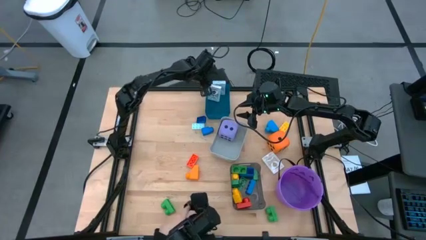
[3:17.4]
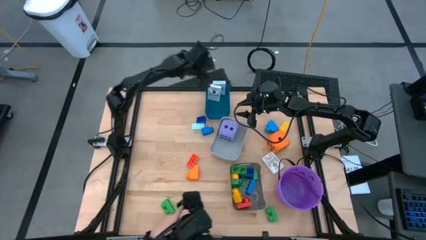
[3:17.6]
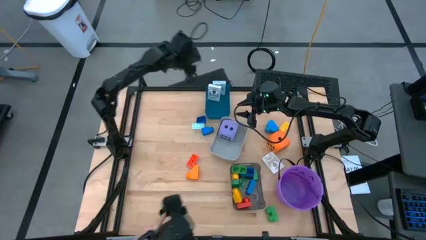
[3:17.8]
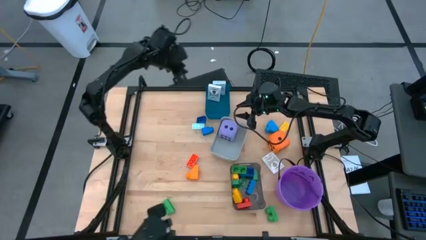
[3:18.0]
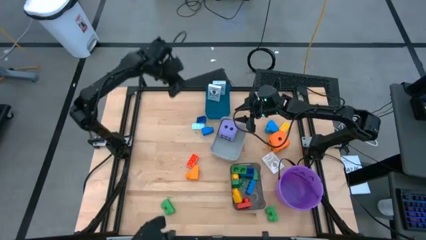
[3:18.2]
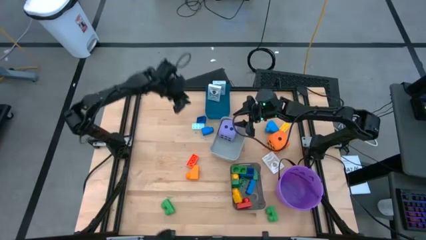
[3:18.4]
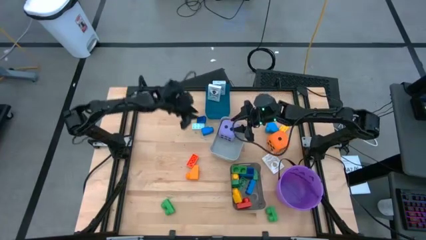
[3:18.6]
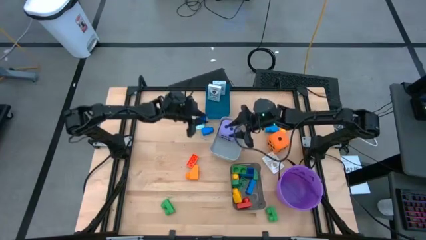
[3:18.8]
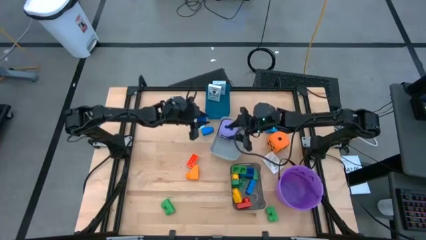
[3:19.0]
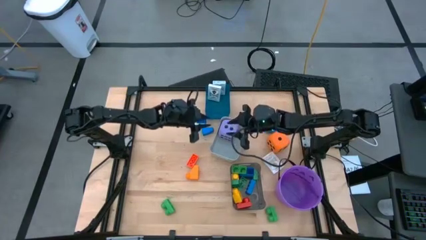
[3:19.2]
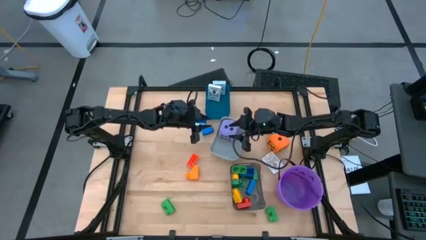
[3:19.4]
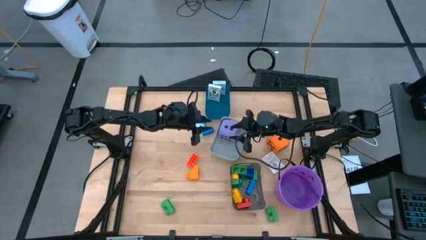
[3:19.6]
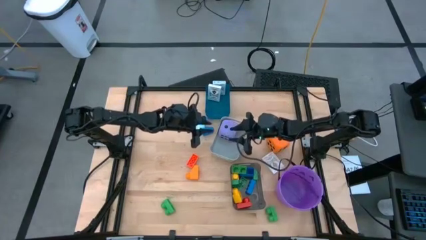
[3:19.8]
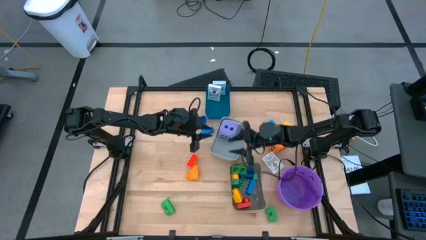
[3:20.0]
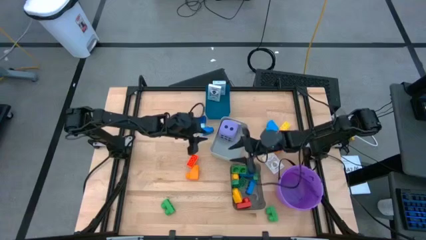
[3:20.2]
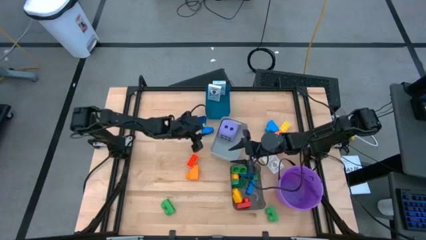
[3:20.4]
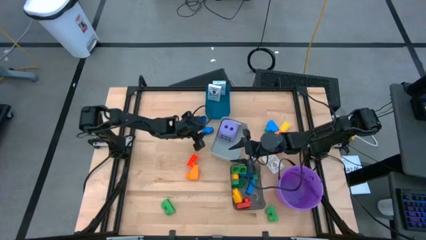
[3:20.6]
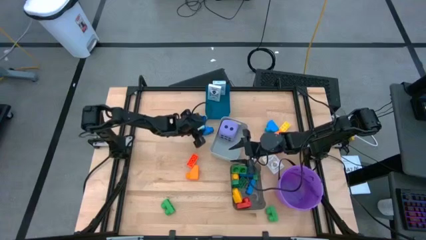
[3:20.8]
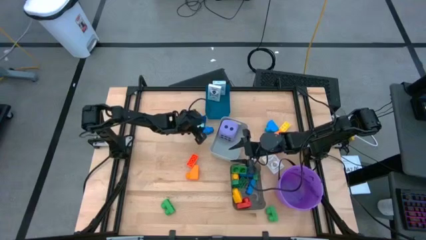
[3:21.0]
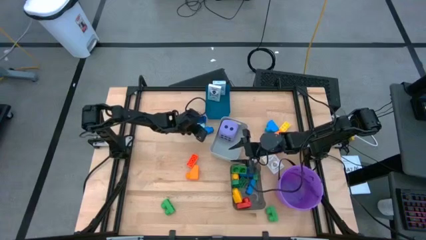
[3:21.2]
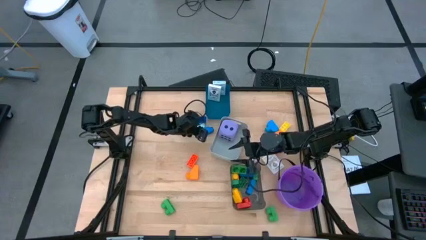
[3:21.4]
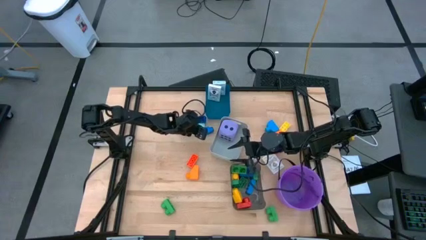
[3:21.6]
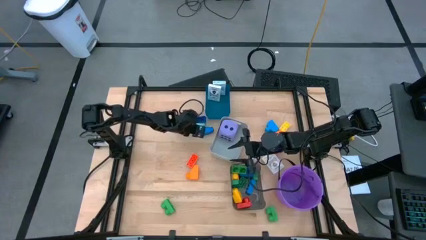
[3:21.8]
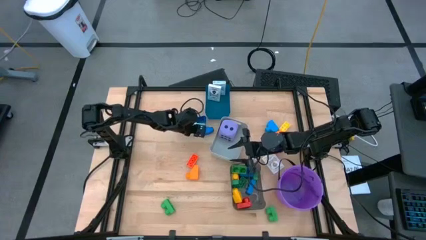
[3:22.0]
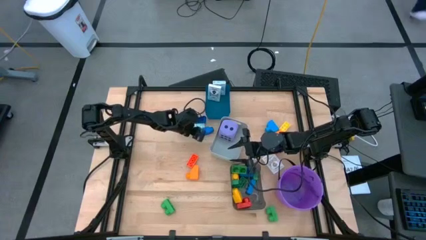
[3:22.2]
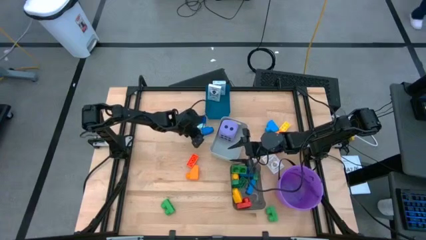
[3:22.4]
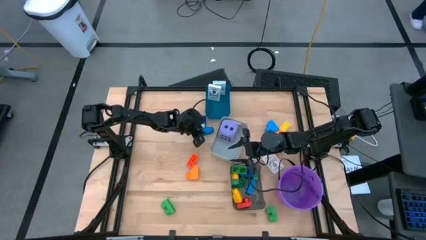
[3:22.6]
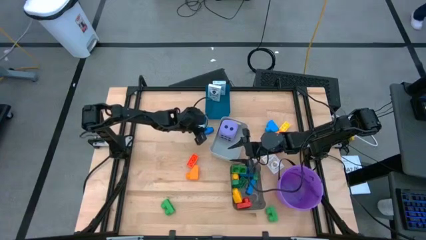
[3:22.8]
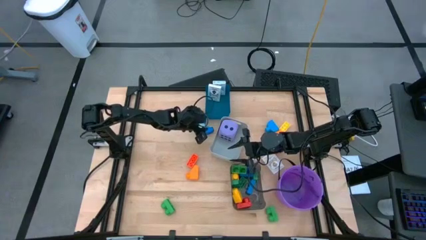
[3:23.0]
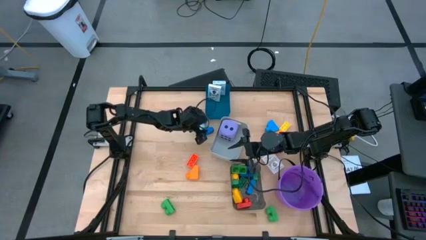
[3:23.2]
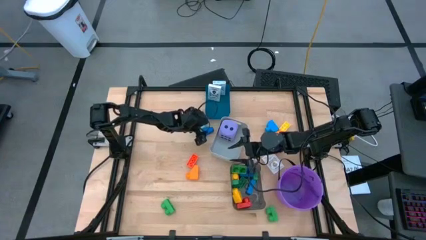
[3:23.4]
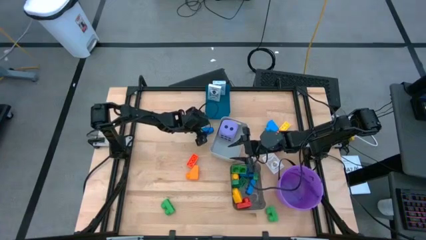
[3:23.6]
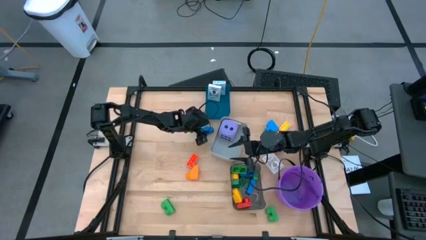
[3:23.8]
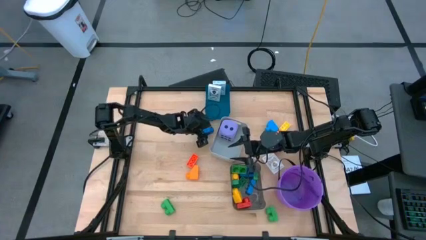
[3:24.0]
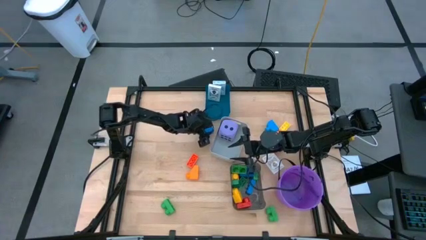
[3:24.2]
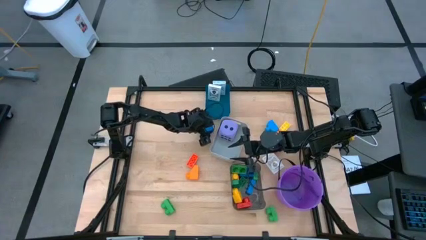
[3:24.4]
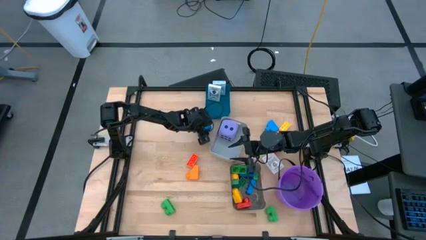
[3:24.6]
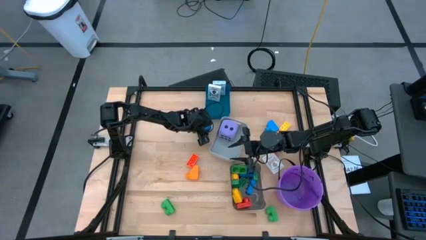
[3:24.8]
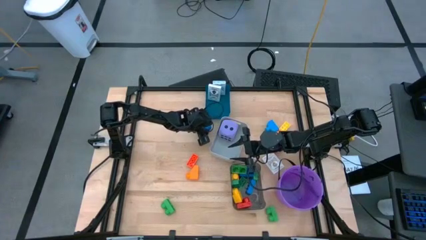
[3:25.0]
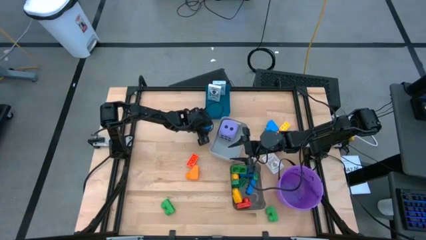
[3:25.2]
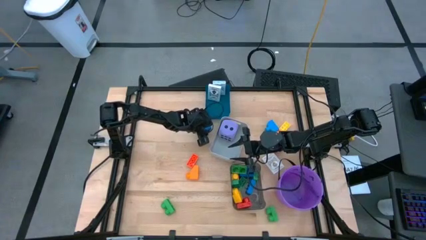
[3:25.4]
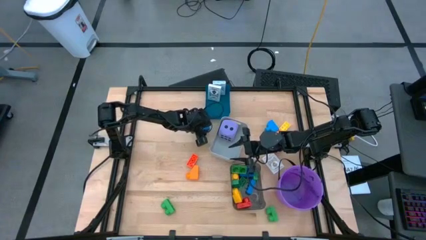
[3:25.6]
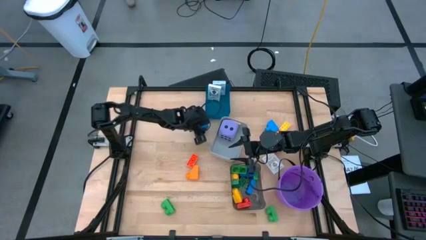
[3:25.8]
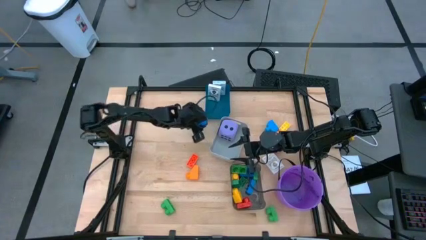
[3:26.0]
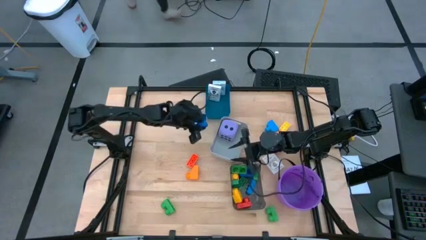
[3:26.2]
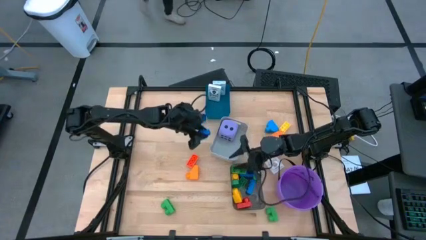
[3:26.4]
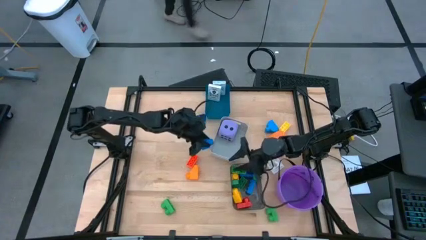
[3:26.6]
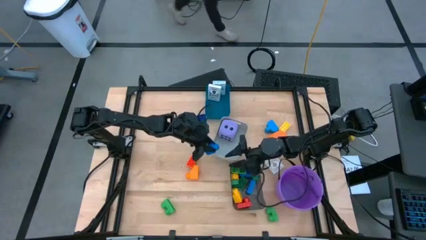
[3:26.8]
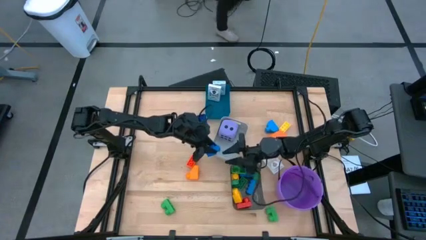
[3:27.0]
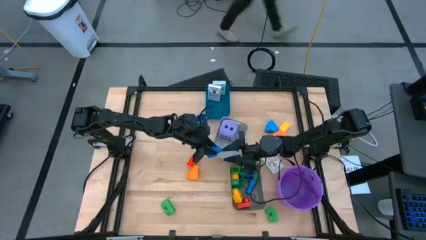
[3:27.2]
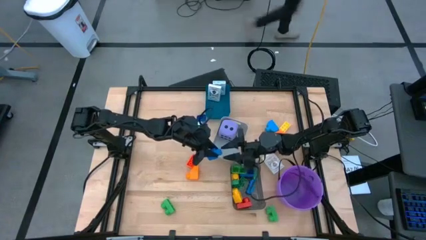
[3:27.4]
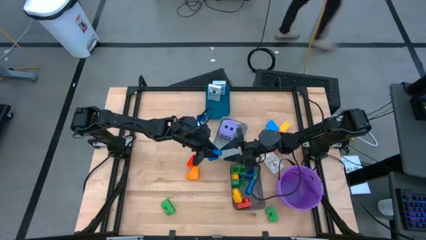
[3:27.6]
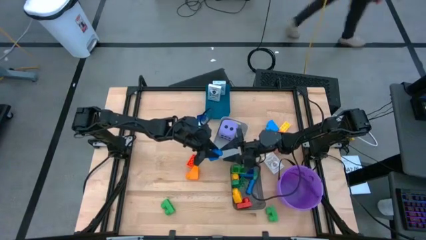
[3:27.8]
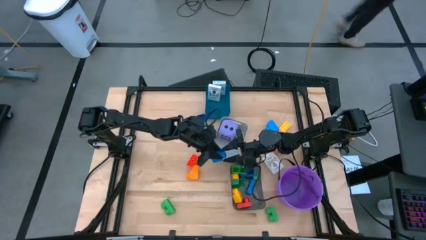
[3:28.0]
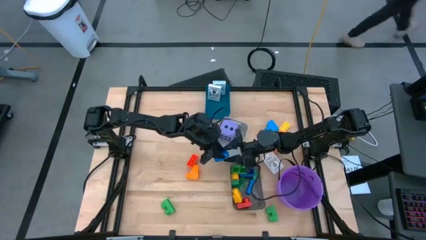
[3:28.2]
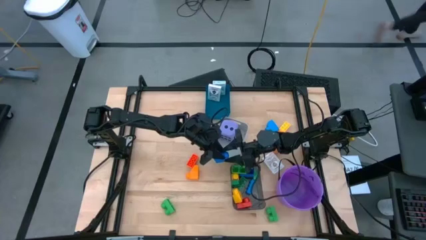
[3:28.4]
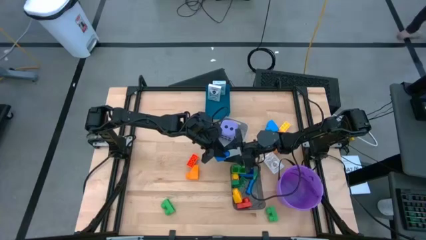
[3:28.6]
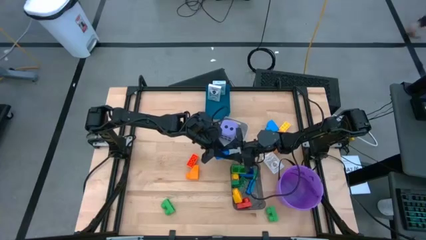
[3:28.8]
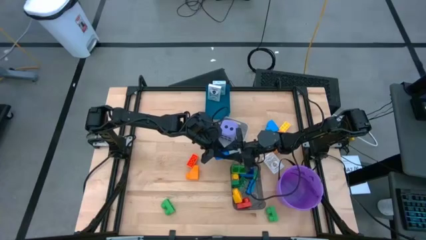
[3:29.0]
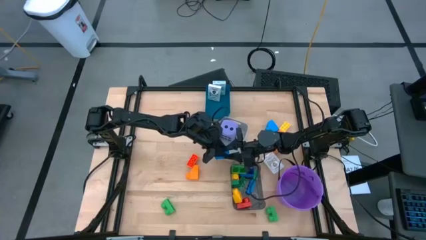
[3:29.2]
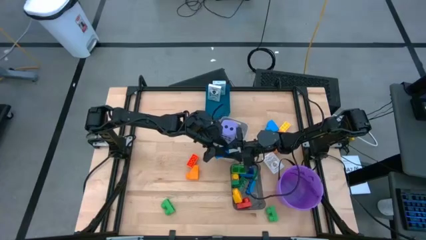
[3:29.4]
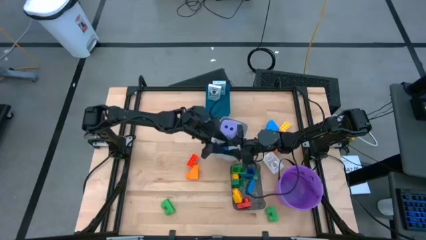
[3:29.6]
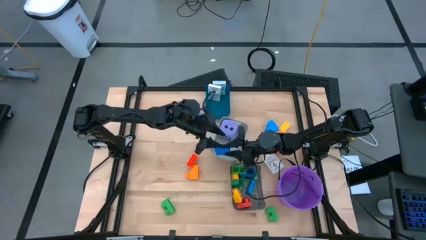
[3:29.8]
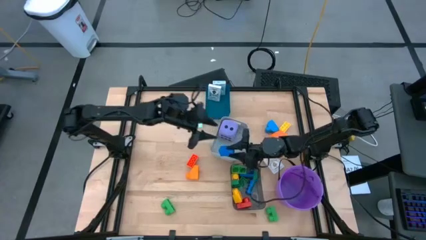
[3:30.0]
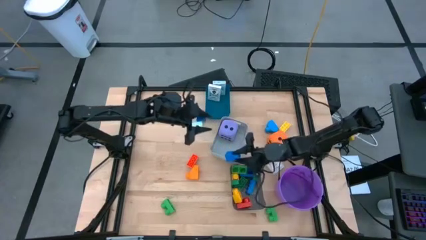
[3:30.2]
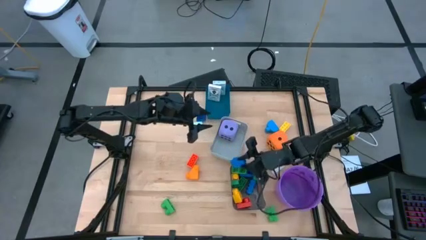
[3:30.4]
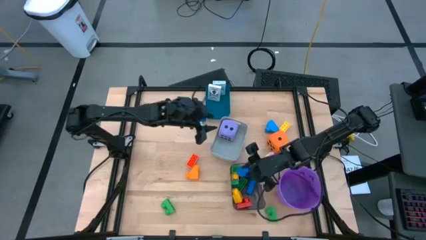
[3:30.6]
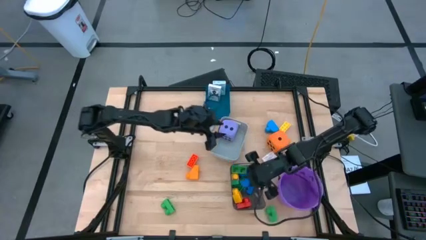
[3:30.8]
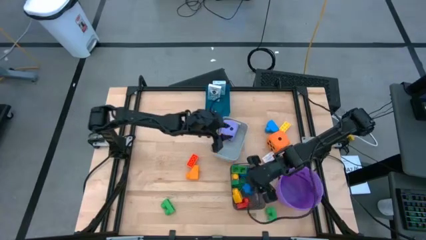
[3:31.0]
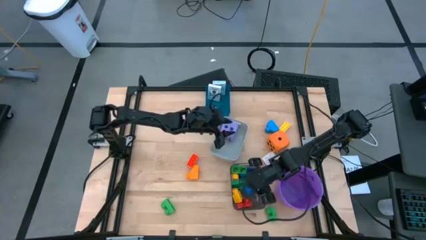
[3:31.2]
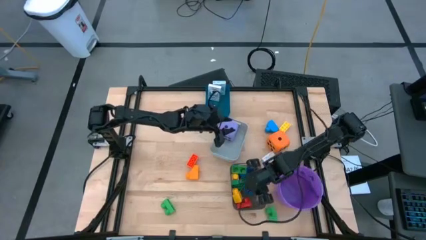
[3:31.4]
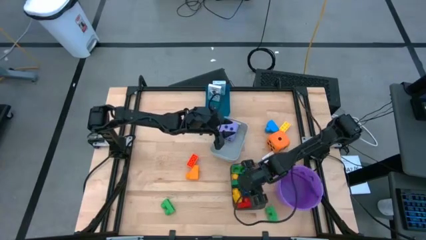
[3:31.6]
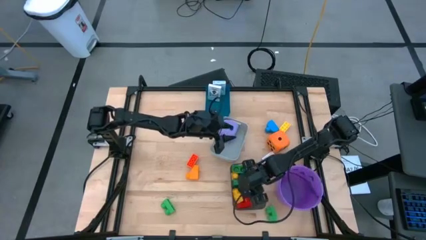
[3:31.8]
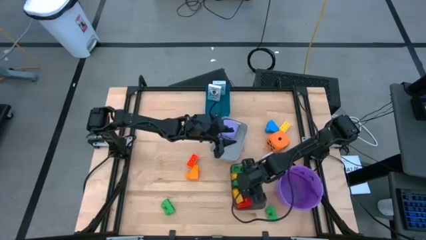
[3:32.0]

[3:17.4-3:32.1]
Task: Pick & Place Toys
Put the blue game piece into the black bin
